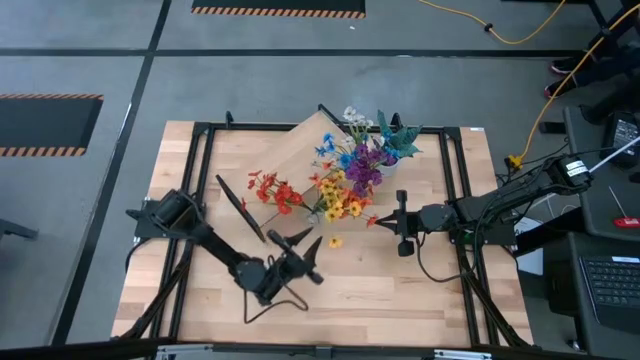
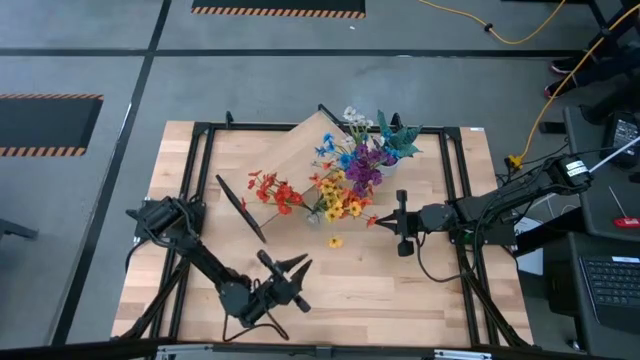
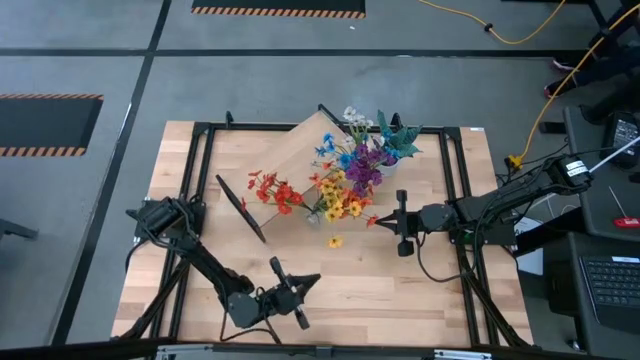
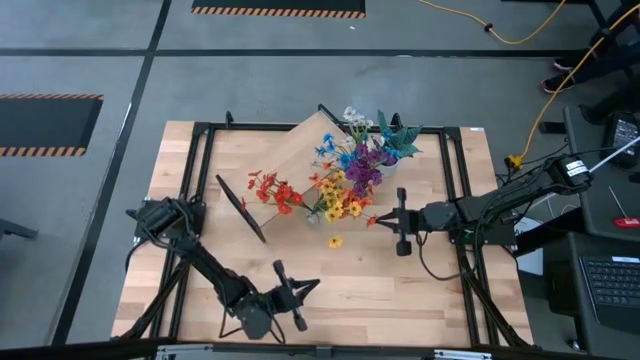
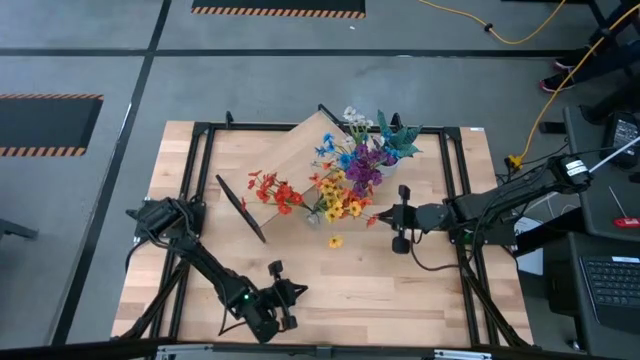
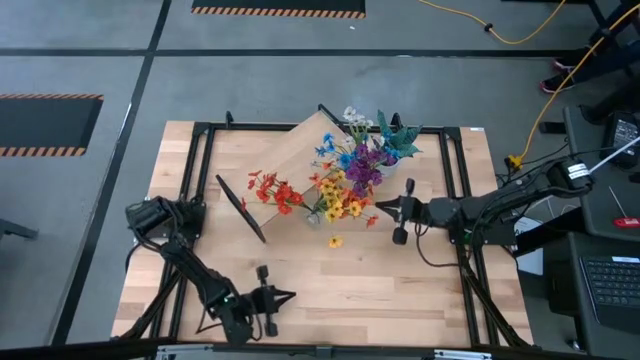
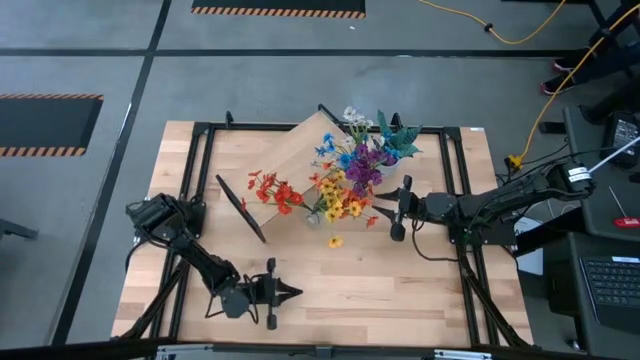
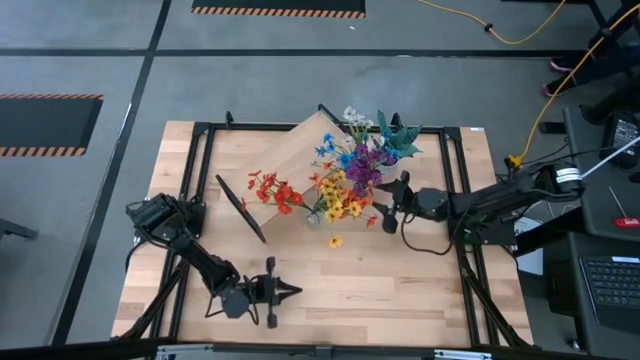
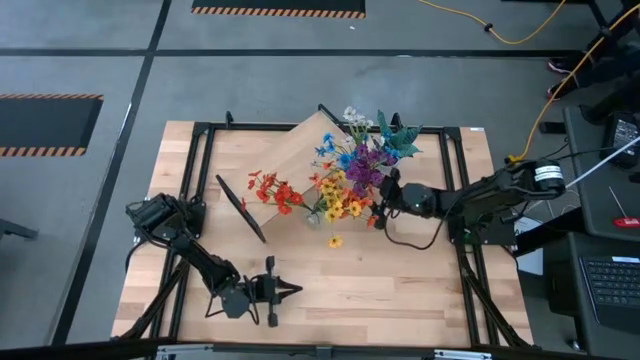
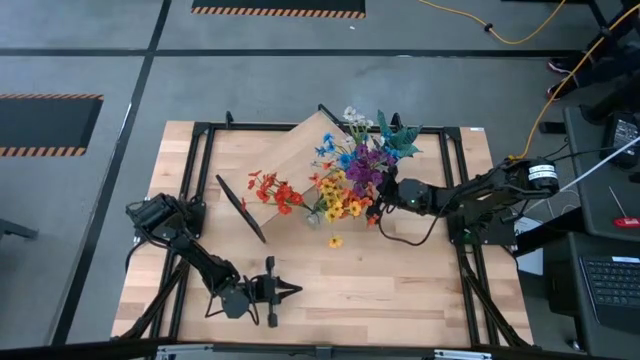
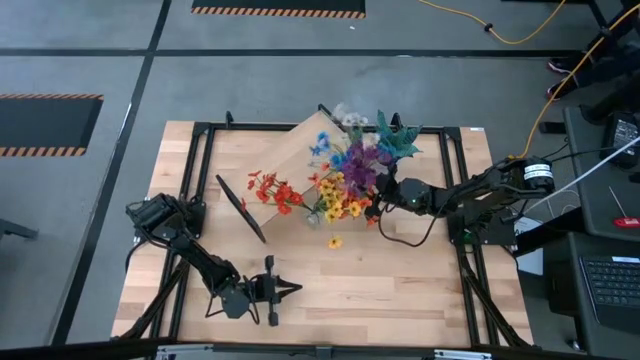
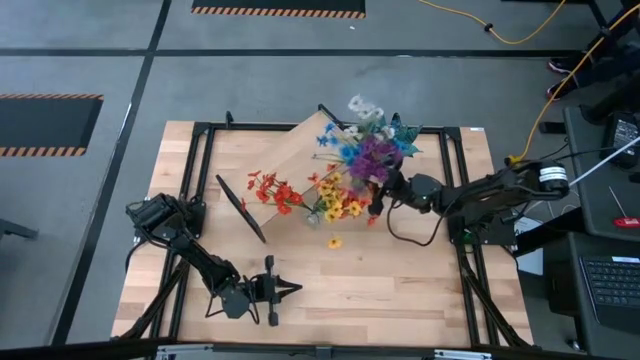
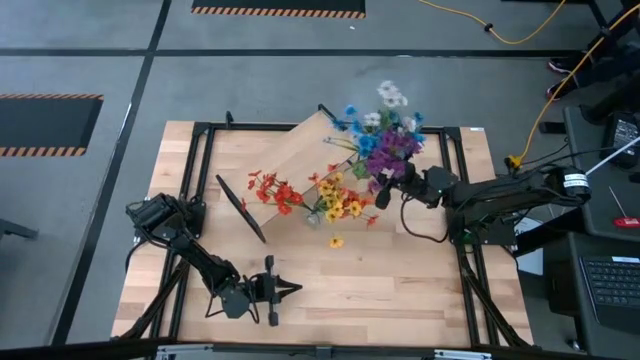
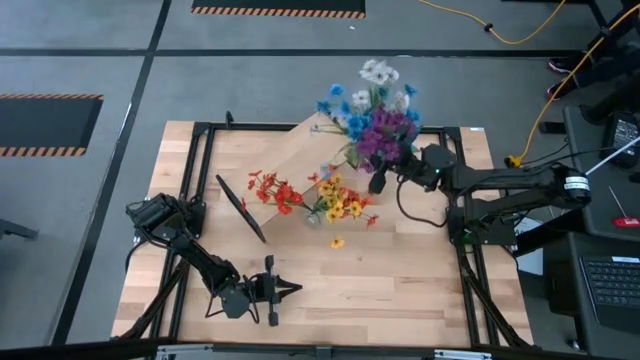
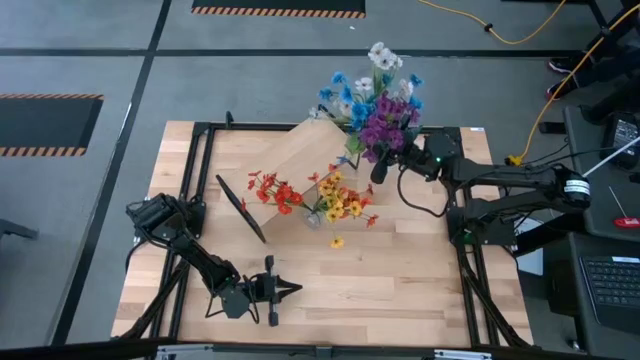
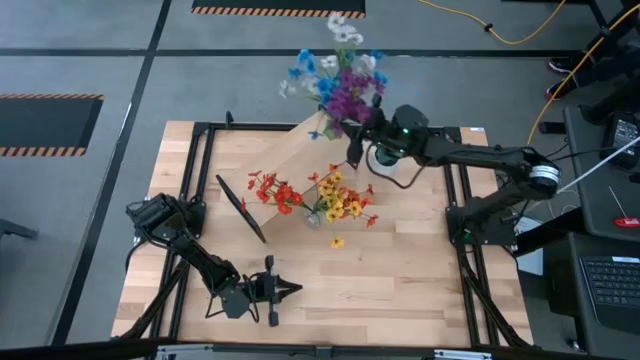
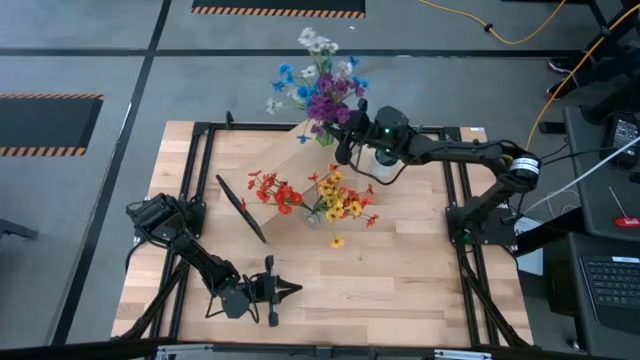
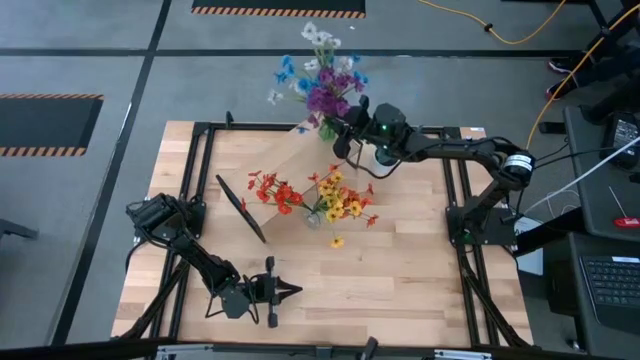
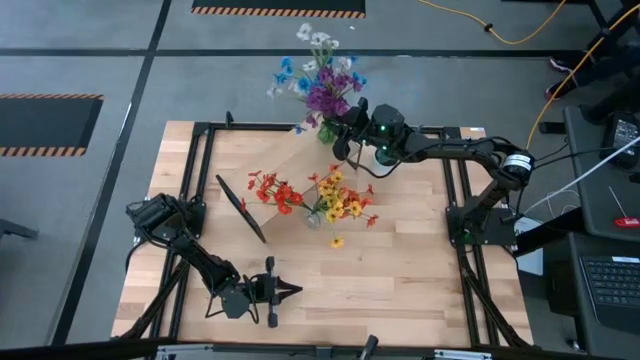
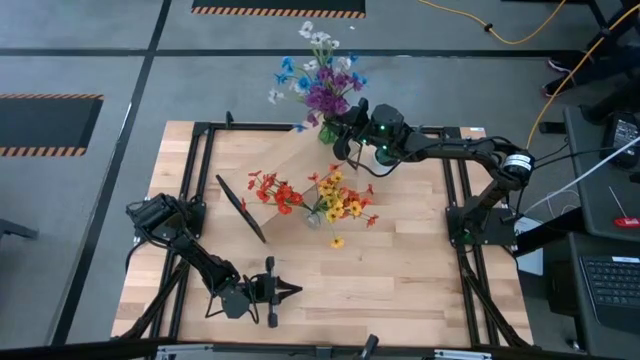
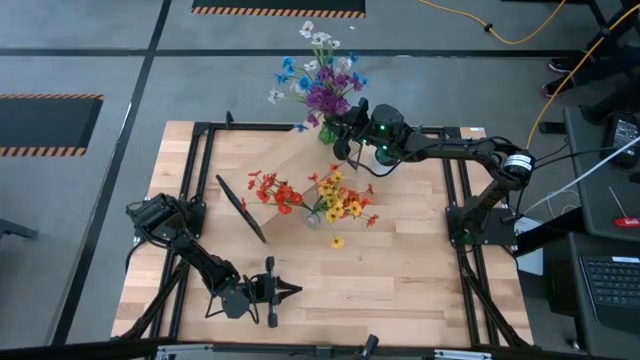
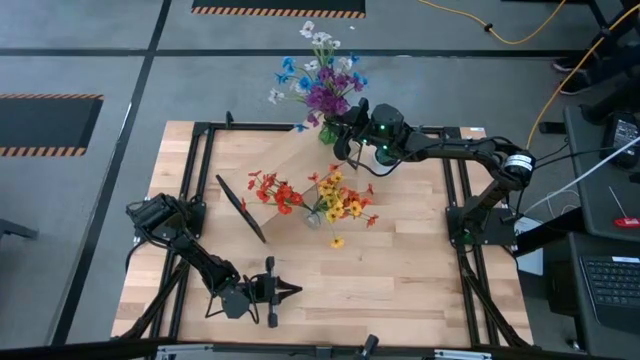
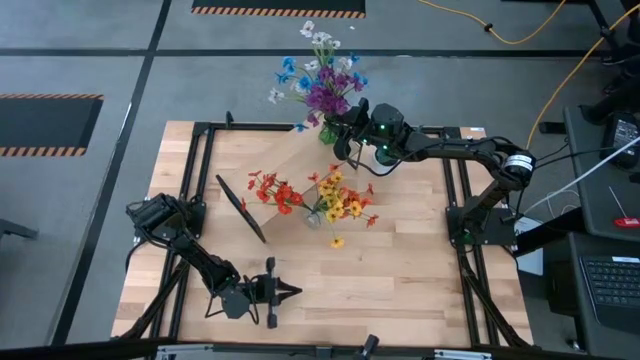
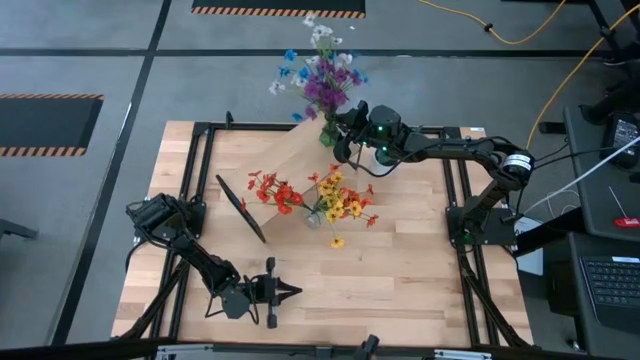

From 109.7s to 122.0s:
Task: Pick and place flowers into a vace then onto a shelf
Put the green vase with flowers on the shelf

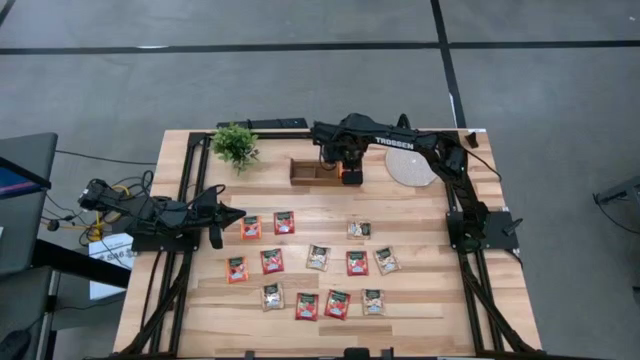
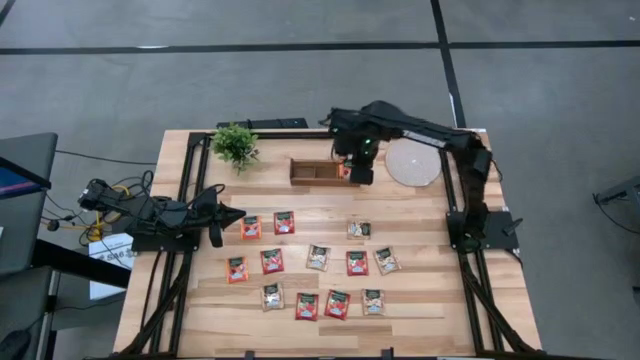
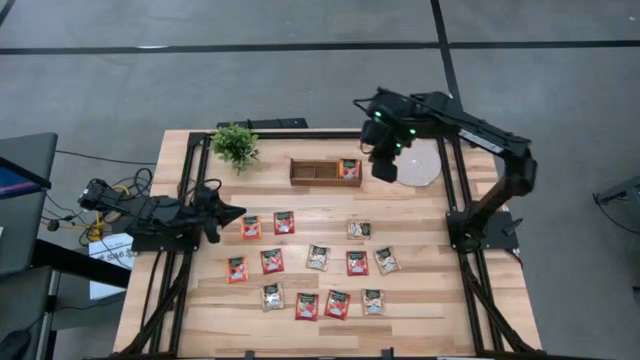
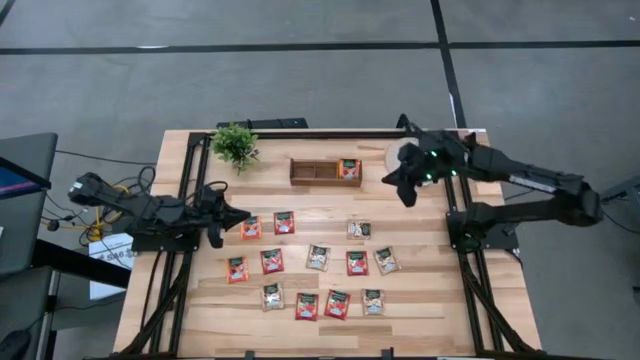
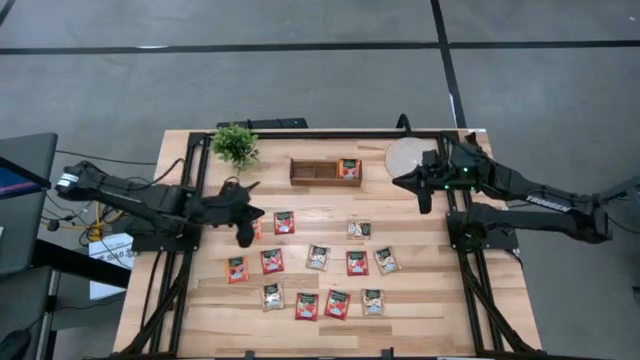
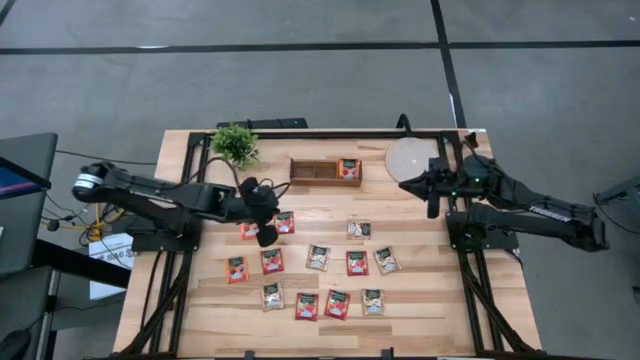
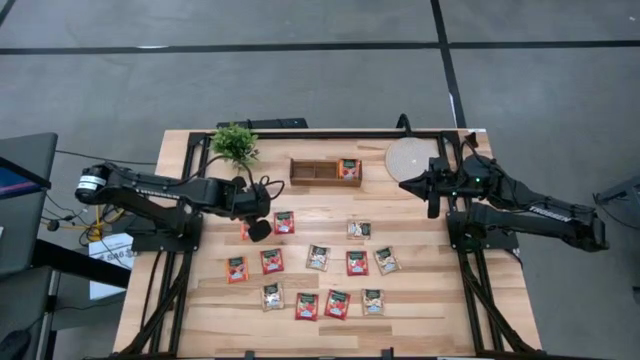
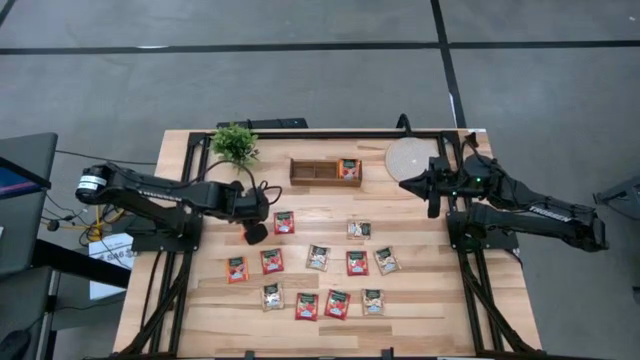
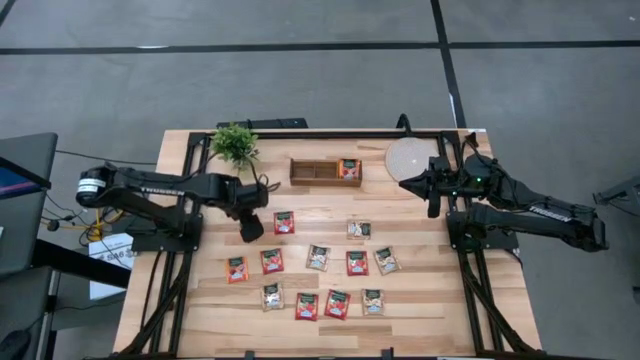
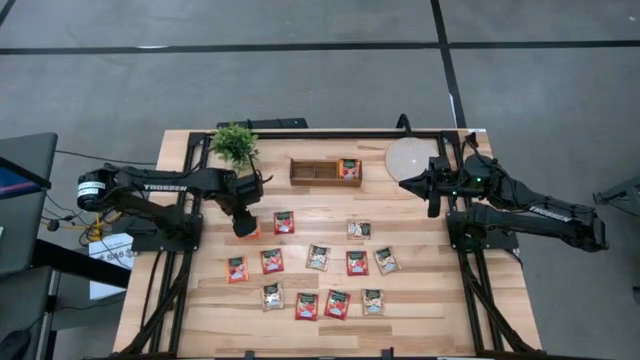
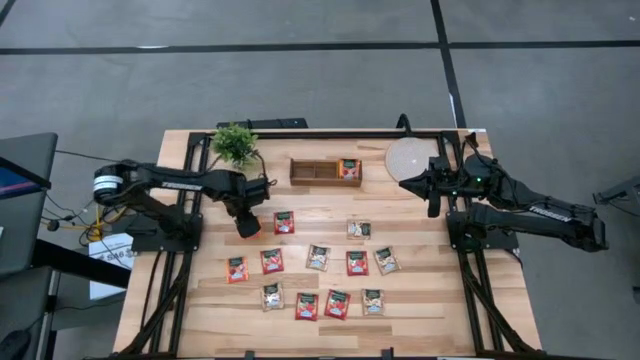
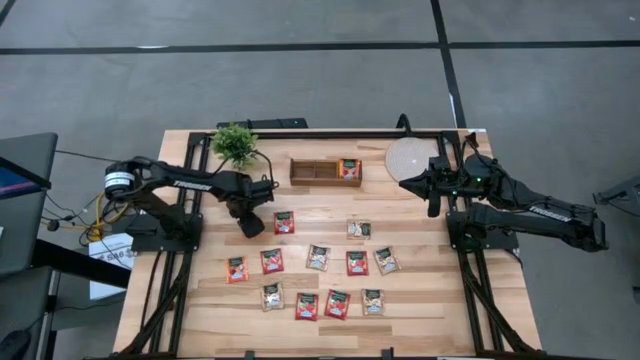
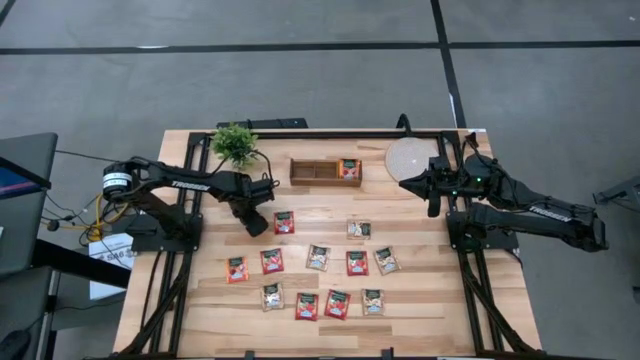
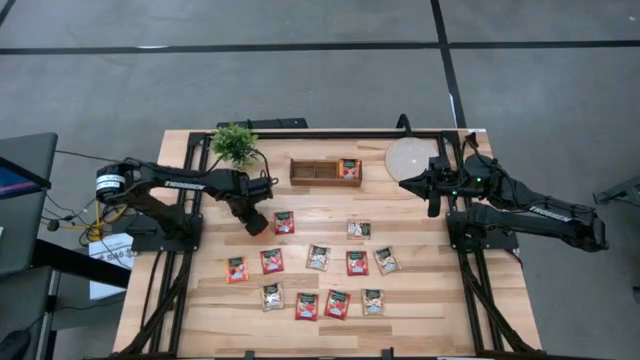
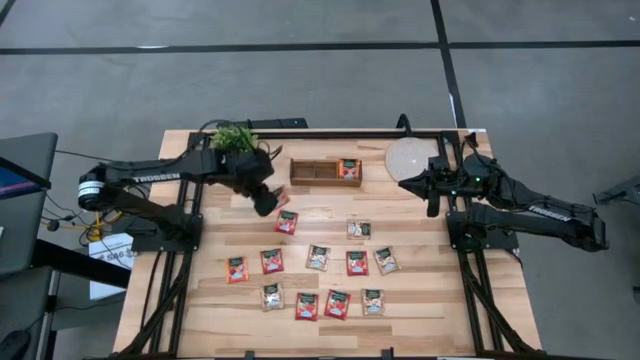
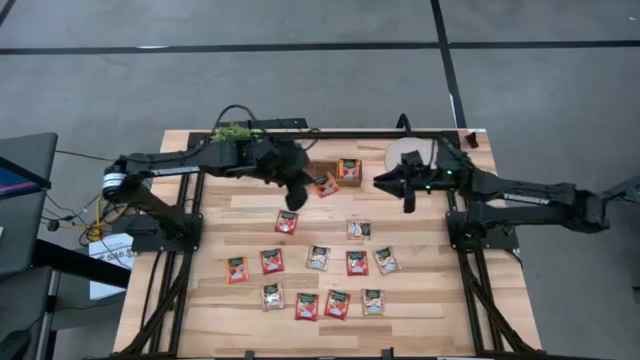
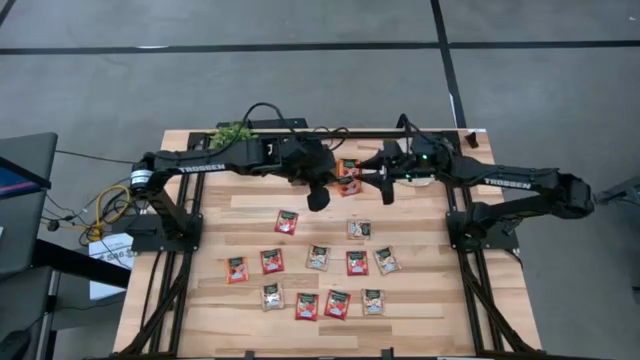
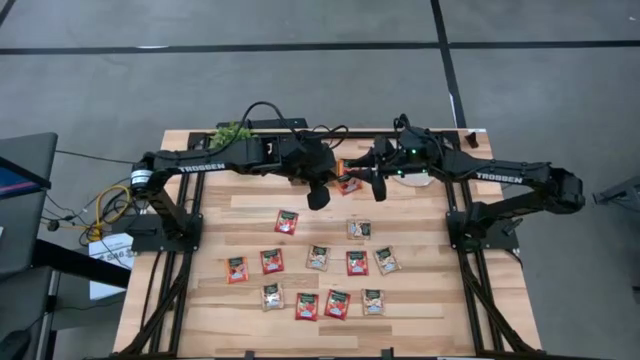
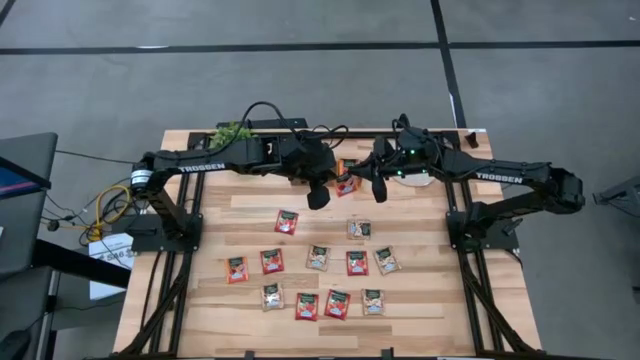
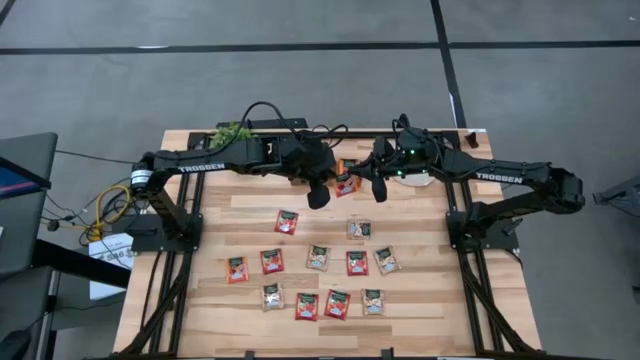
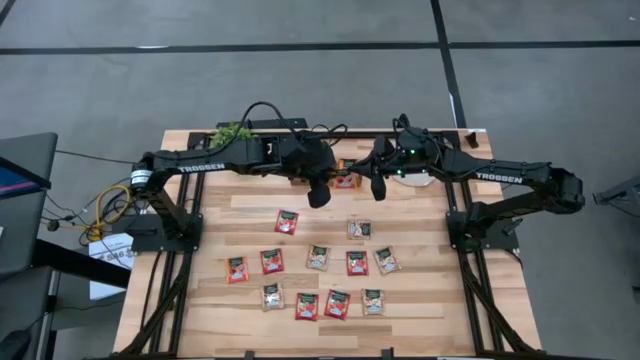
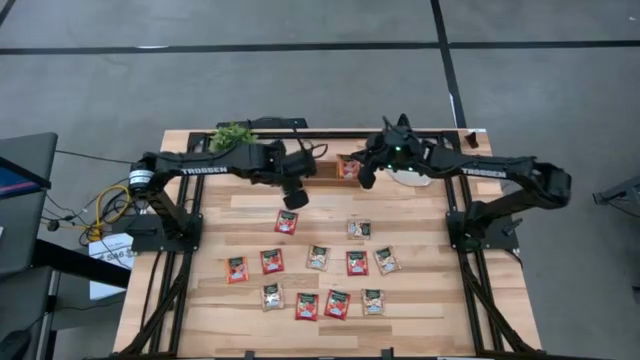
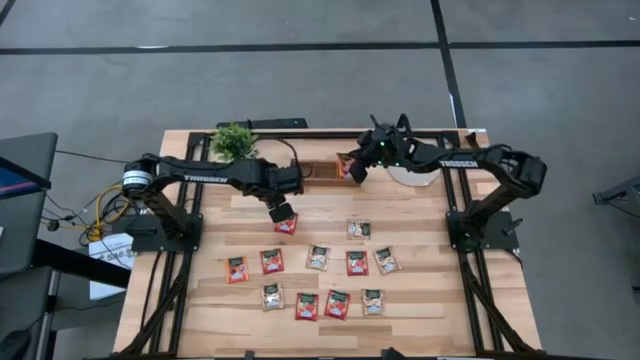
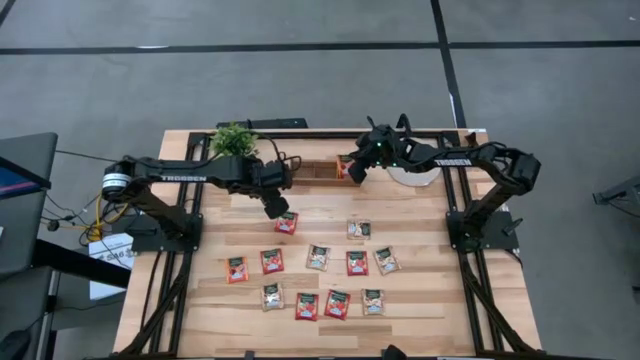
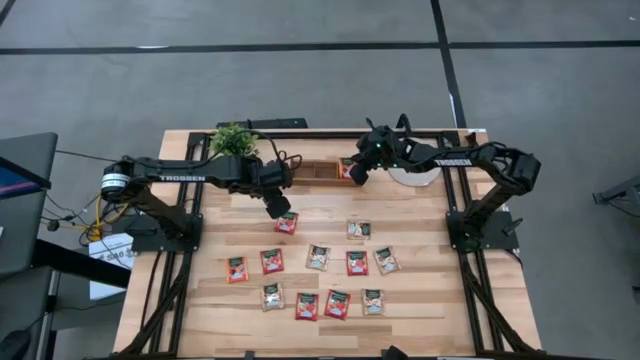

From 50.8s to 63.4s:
Task: Pick & Place Tea
Put the top orange tea bag into the right section of the wooden organizer
